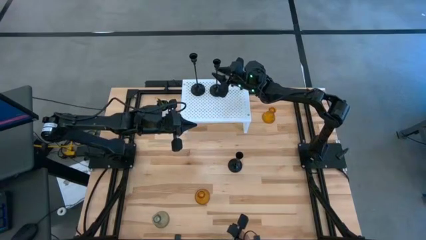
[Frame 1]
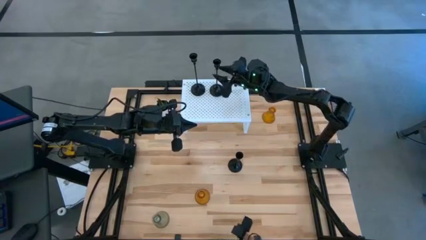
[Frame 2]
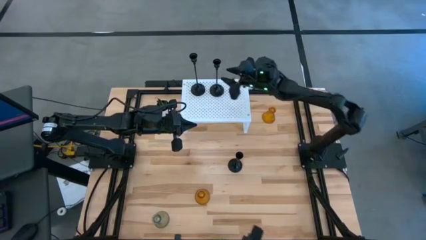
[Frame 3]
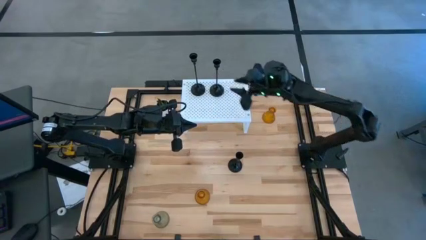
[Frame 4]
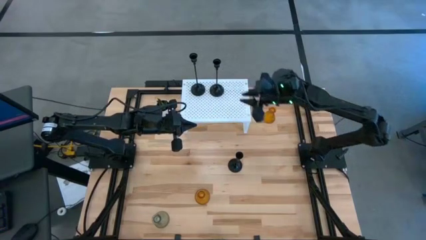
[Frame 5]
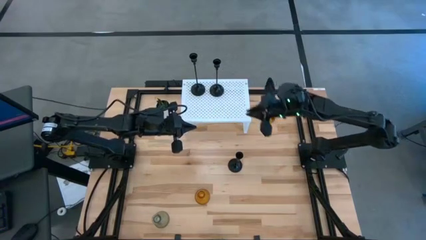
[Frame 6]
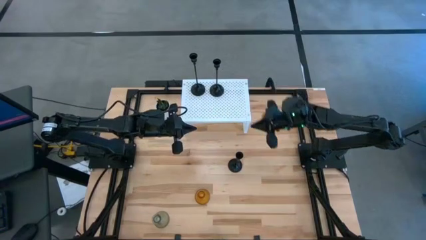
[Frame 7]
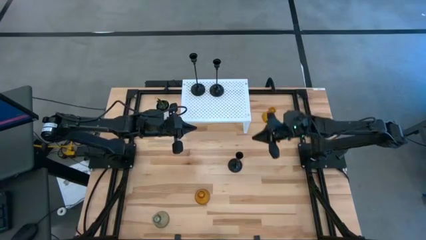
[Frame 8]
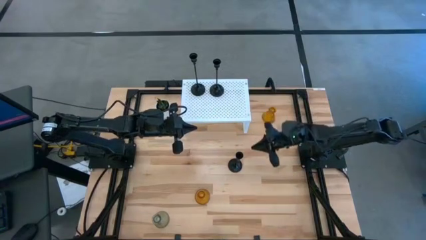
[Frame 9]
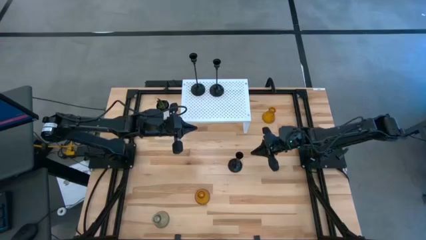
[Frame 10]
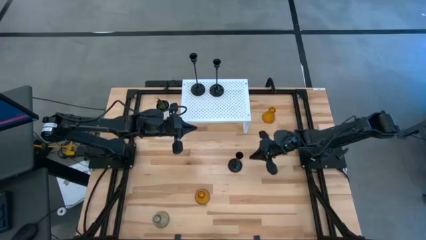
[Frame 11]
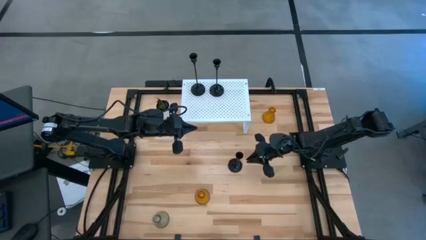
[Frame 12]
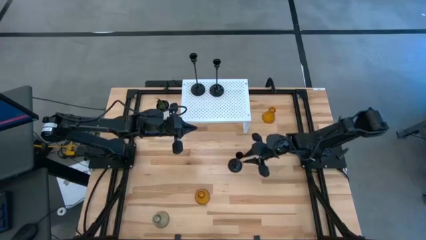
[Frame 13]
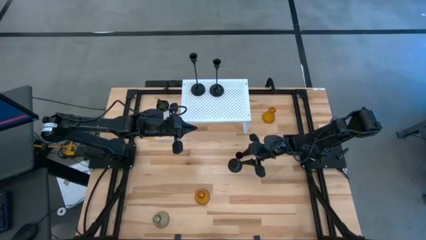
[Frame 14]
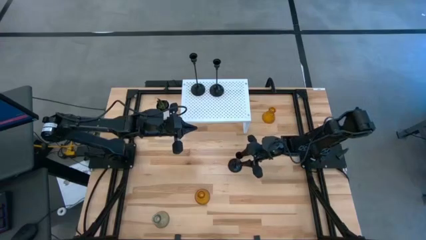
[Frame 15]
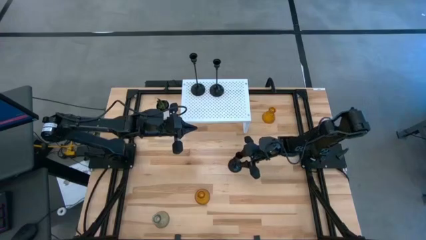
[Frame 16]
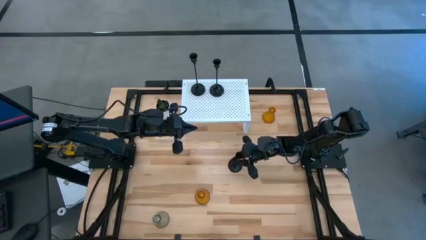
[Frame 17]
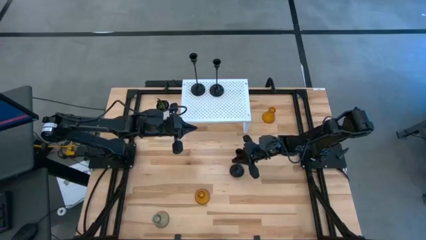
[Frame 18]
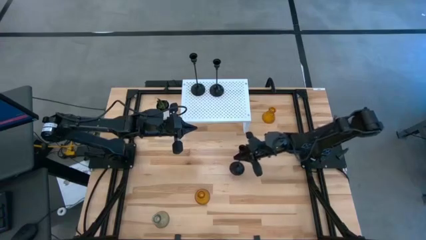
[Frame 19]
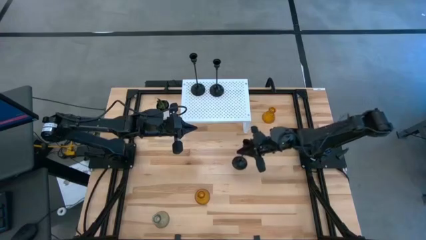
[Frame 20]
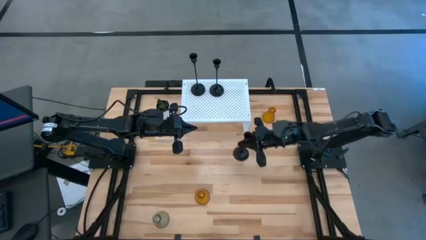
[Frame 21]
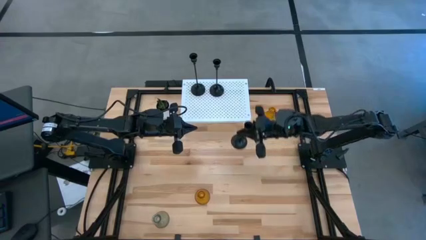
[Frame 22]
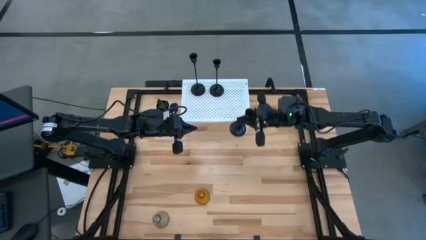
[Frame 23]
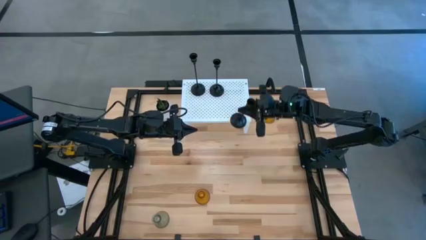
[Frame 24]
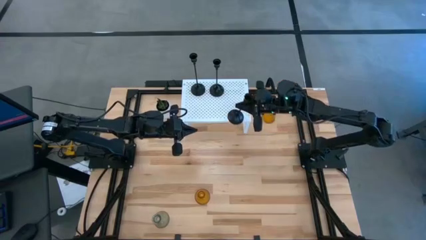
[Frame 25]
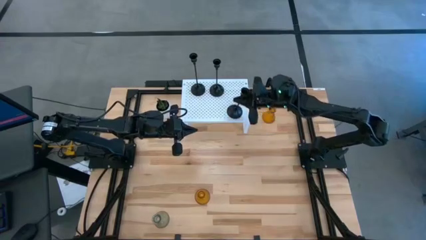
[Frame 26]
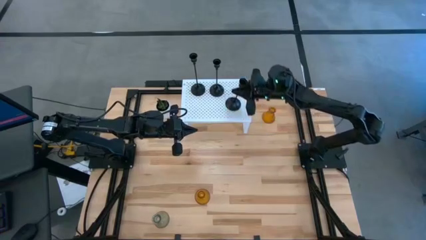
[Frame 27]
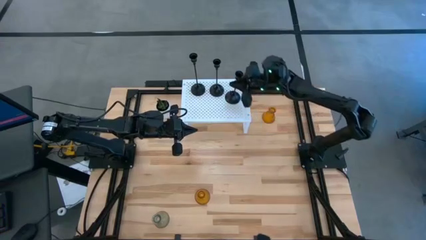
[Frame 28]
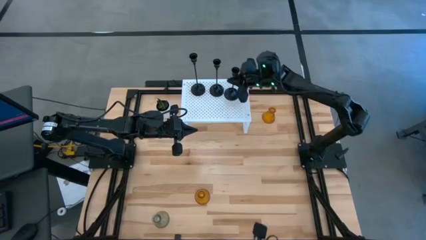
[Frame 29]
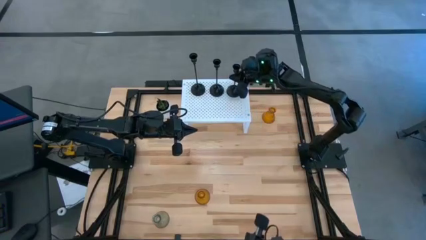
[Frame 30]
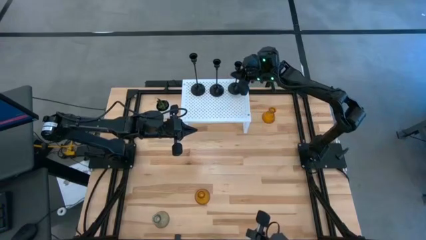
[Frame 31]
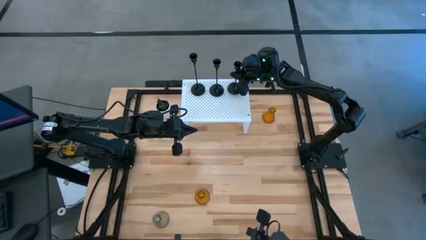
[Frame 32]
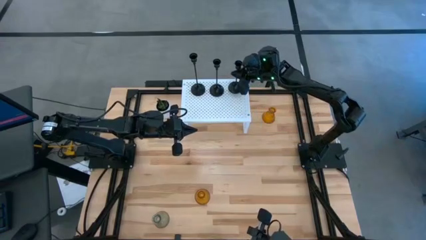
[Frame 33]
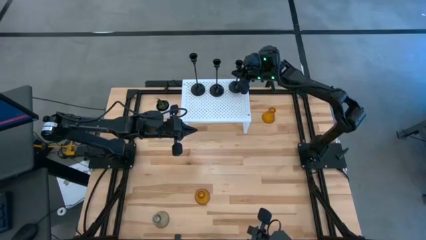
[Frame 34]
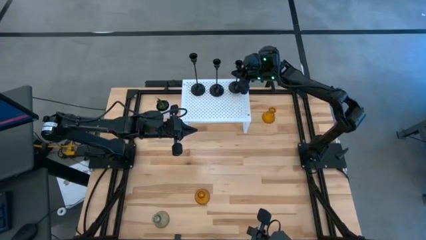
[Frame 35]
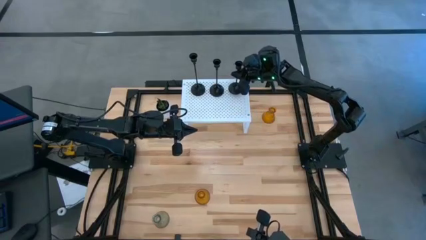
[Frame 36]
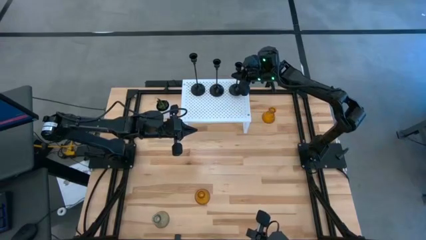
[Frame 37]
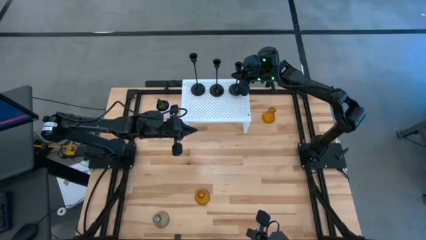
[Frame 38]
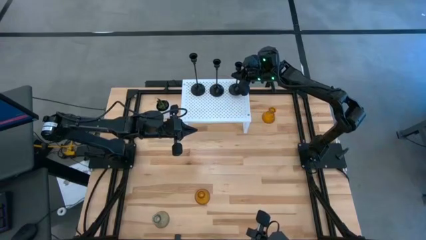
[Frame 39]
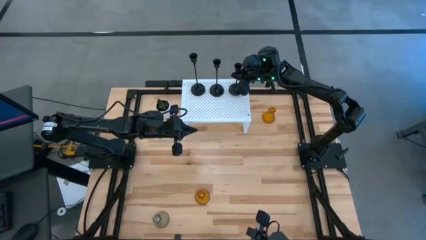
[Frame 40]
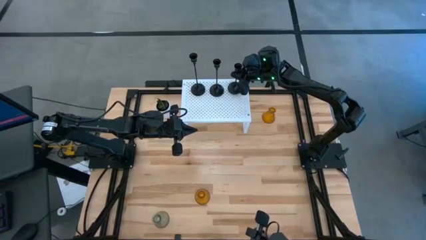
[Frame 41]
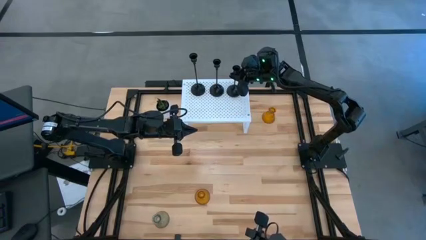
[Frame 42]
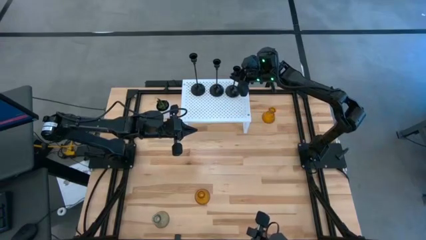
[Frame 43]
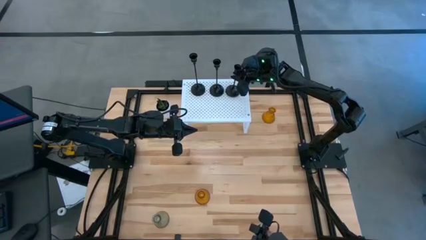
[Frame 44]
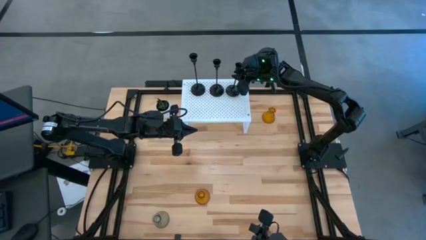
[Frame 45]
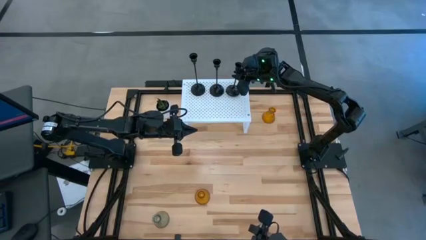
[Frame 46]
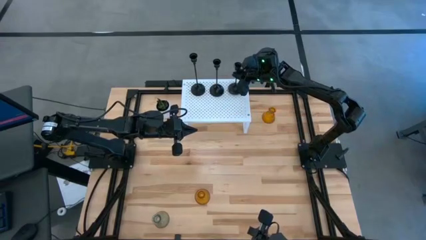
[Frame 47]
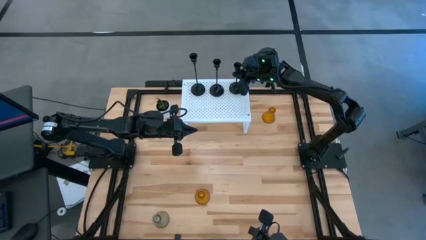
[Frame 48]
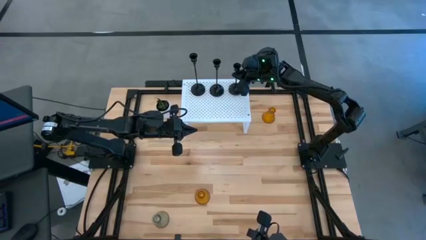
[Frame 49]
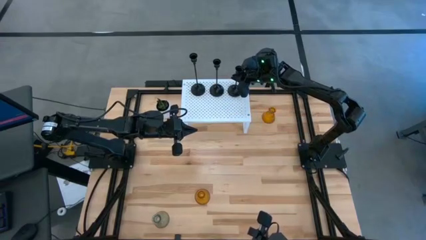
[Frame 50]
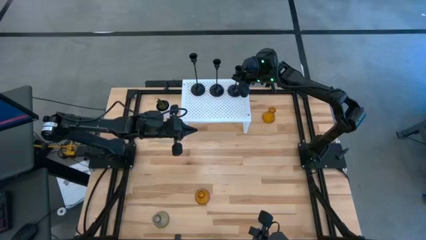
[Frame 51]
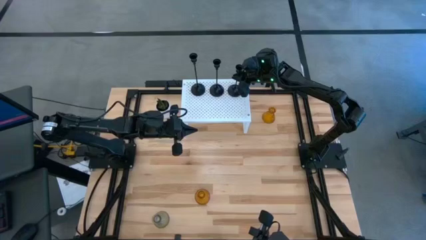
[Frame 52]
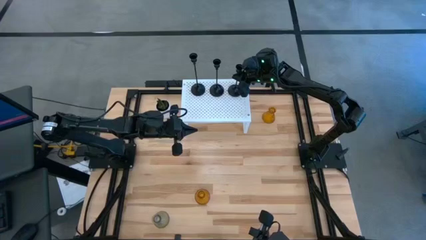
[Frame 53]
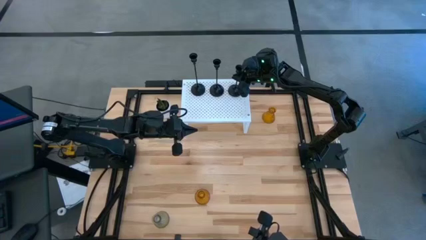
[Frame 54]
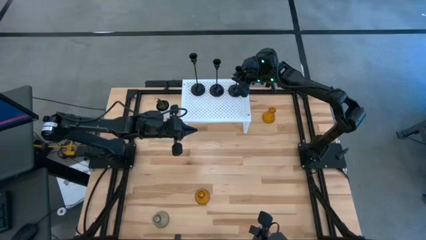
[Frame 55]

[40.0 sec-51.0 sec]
Task: Pick & Place candle stick holders
Put the black candle holder on the shelf aligned with the other black candle holders
